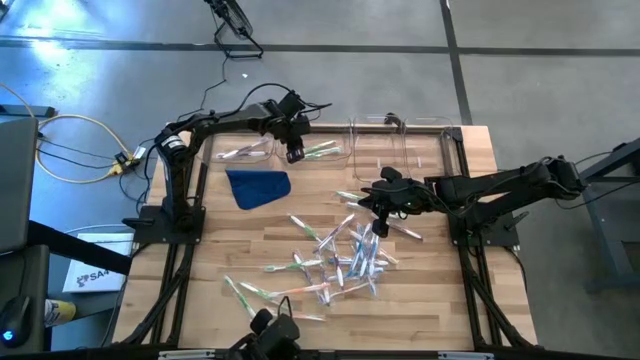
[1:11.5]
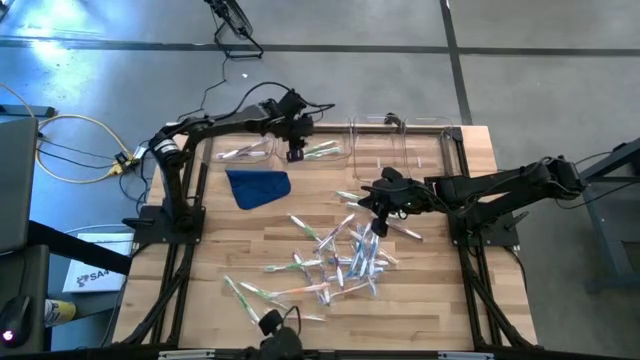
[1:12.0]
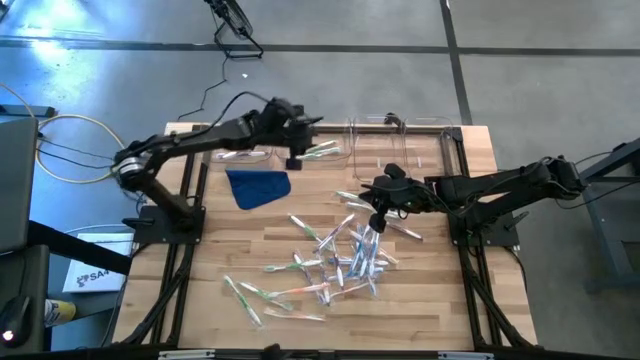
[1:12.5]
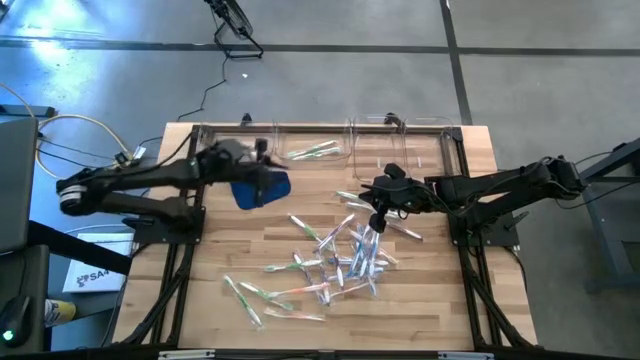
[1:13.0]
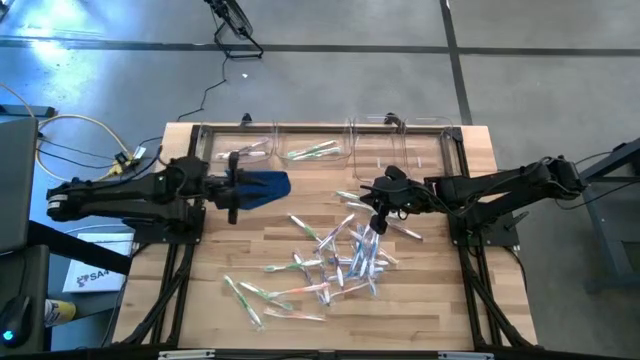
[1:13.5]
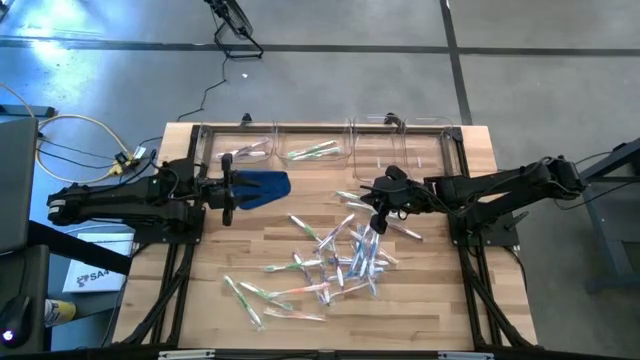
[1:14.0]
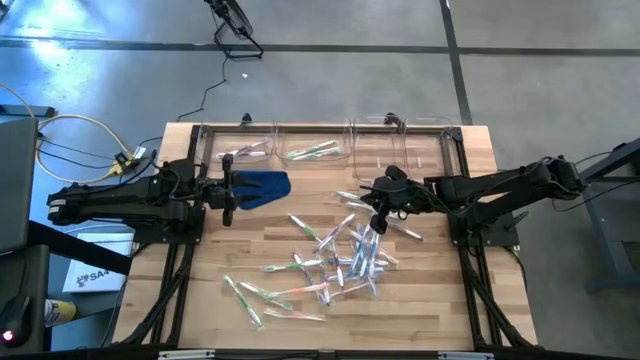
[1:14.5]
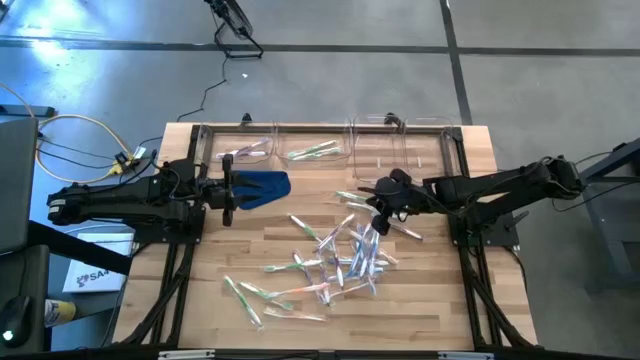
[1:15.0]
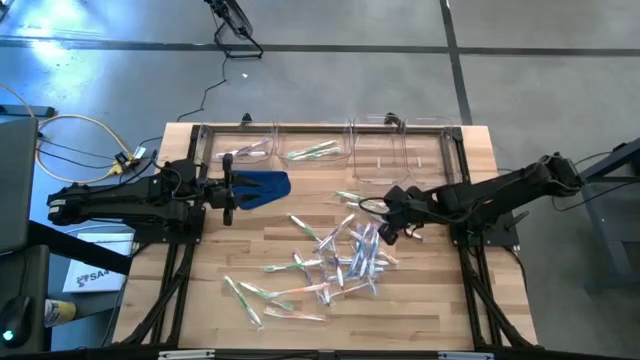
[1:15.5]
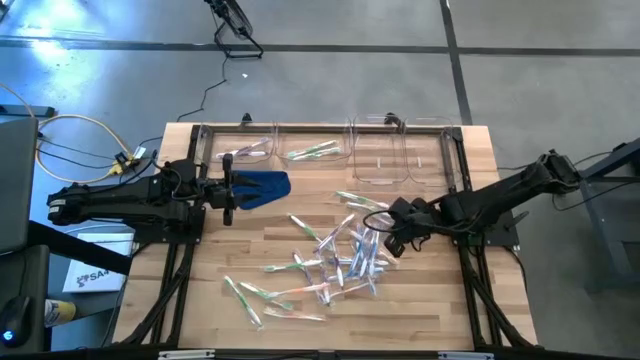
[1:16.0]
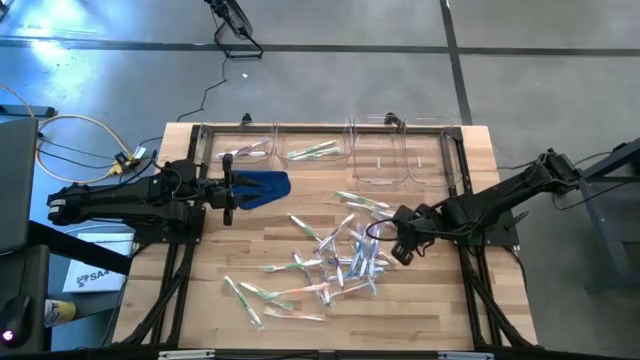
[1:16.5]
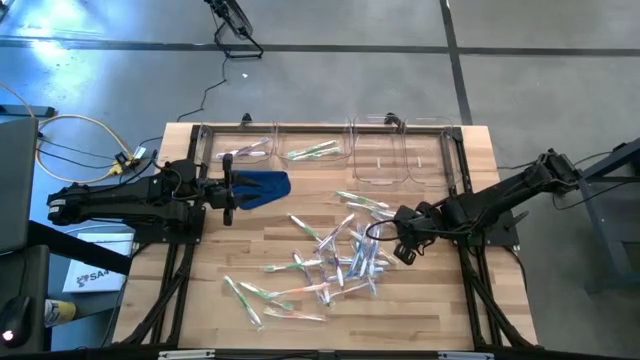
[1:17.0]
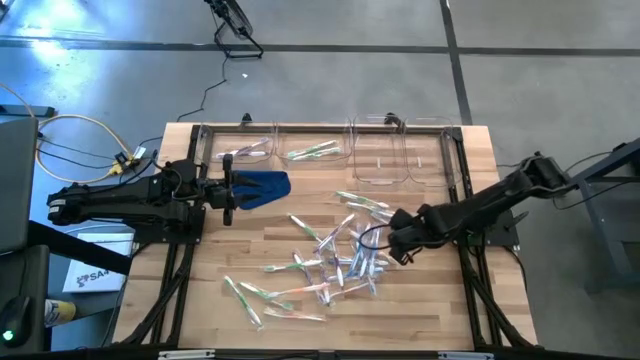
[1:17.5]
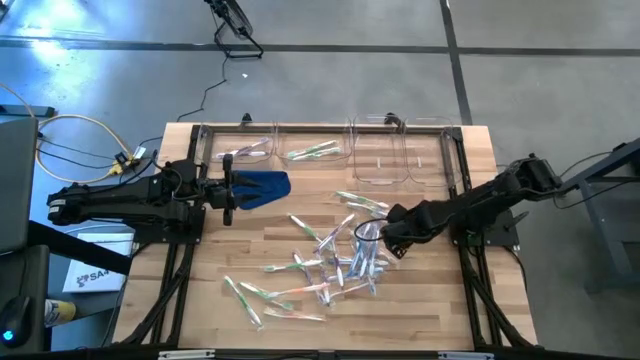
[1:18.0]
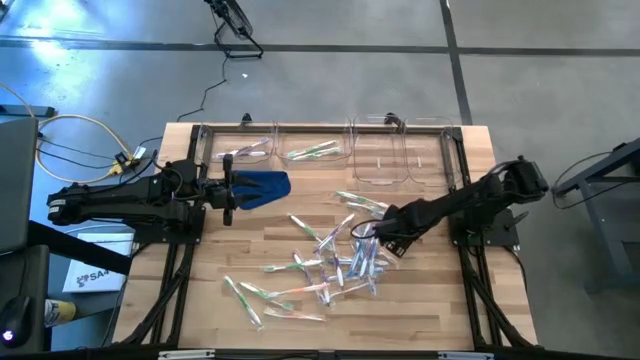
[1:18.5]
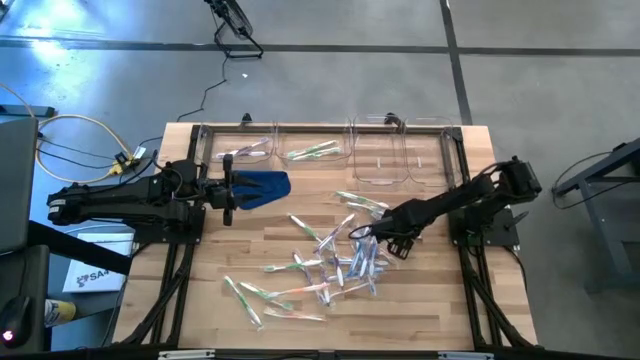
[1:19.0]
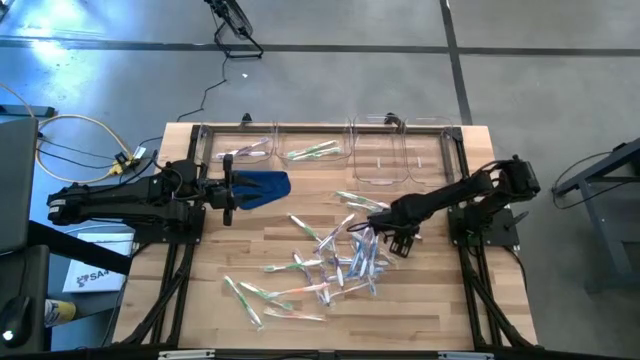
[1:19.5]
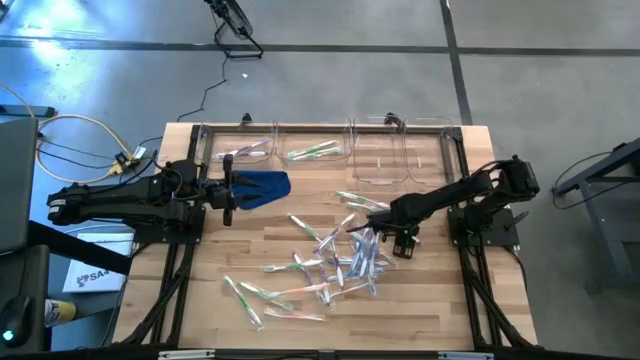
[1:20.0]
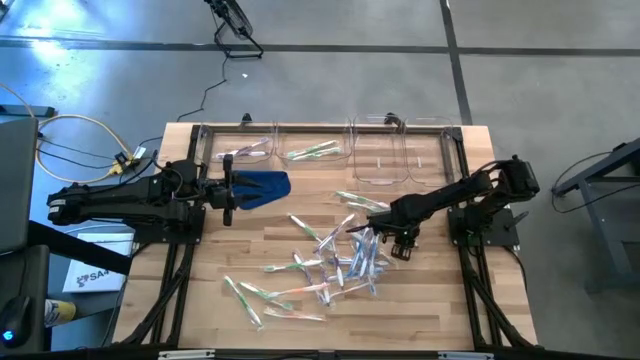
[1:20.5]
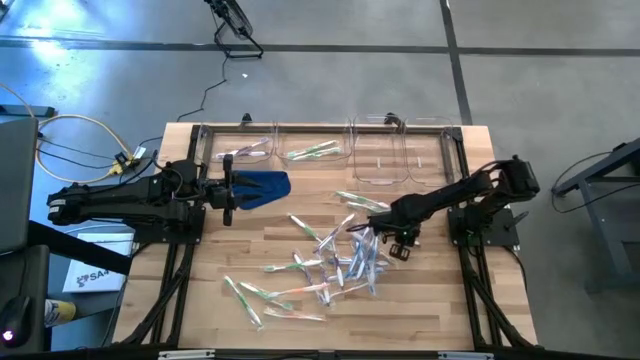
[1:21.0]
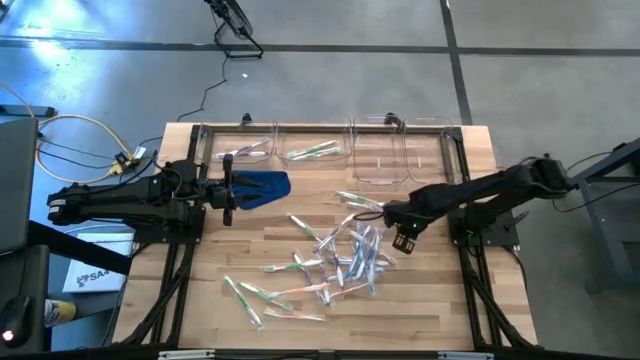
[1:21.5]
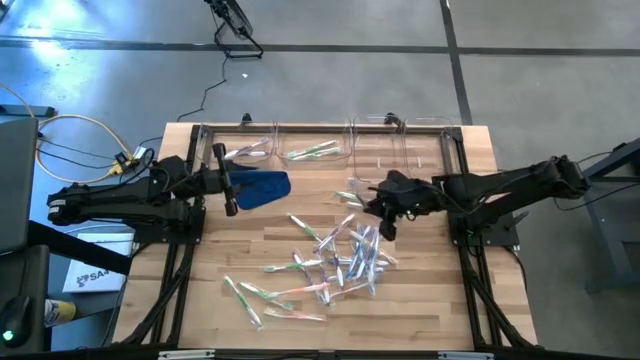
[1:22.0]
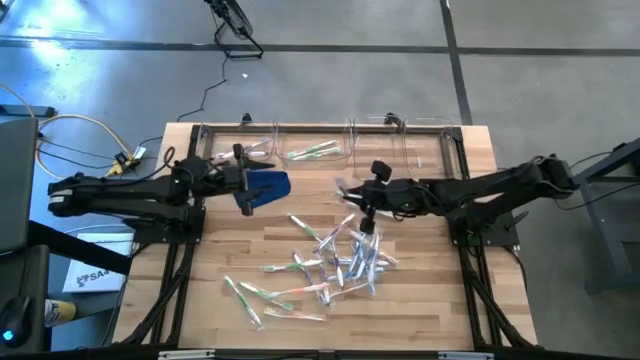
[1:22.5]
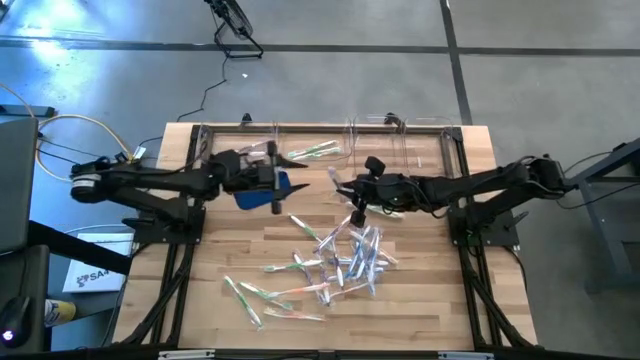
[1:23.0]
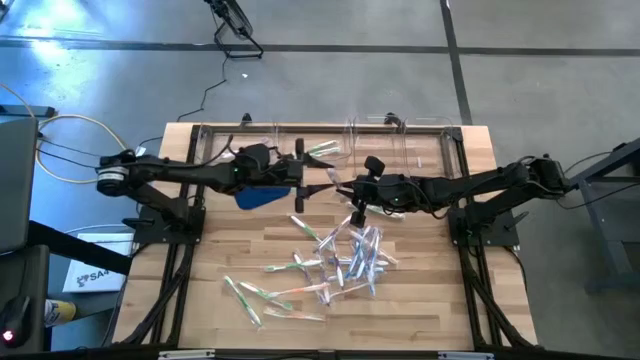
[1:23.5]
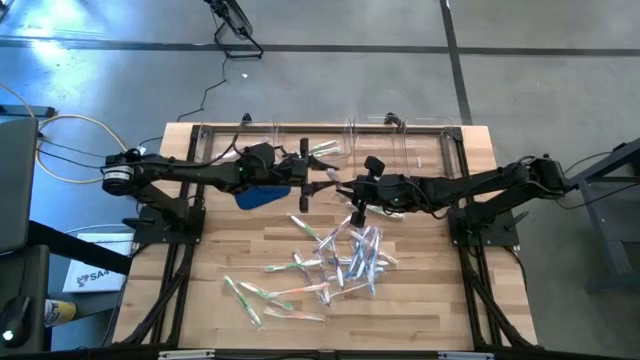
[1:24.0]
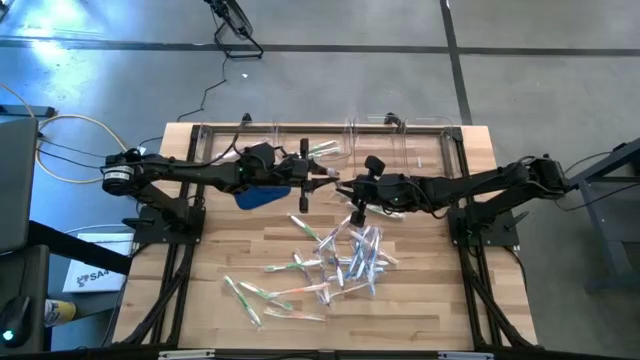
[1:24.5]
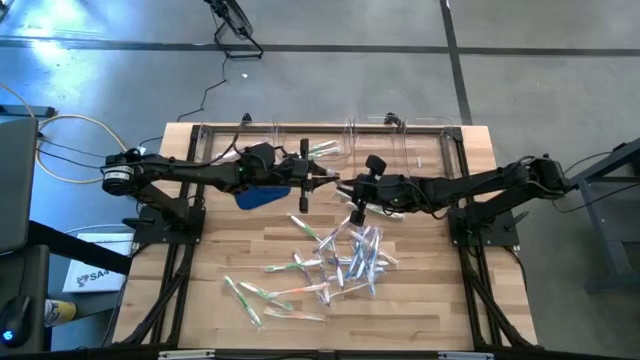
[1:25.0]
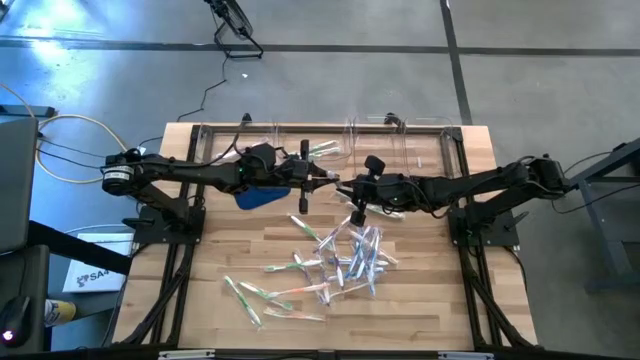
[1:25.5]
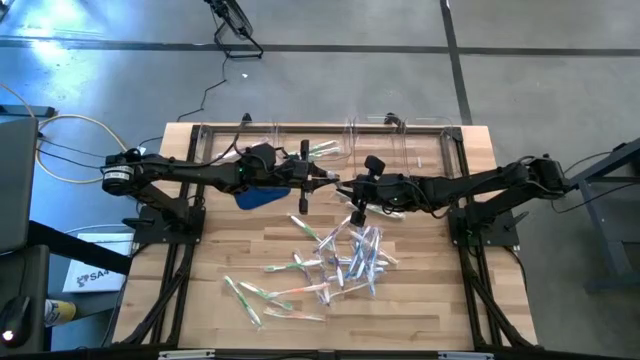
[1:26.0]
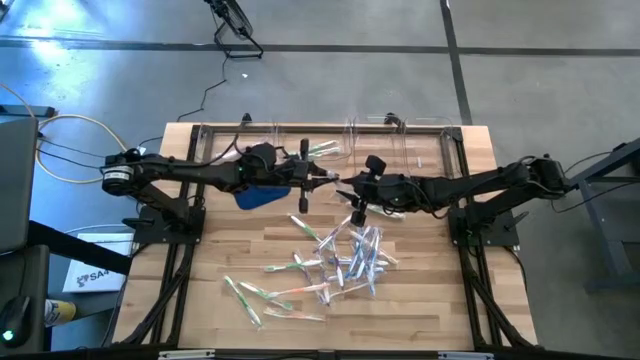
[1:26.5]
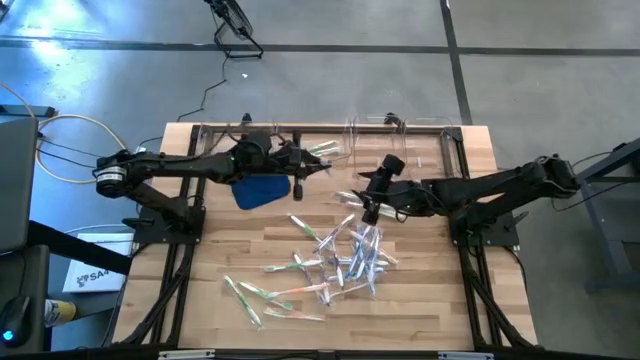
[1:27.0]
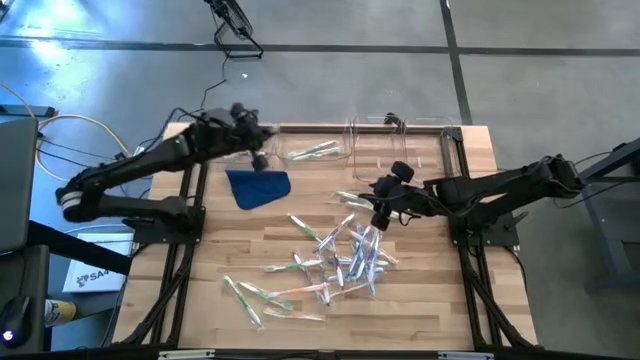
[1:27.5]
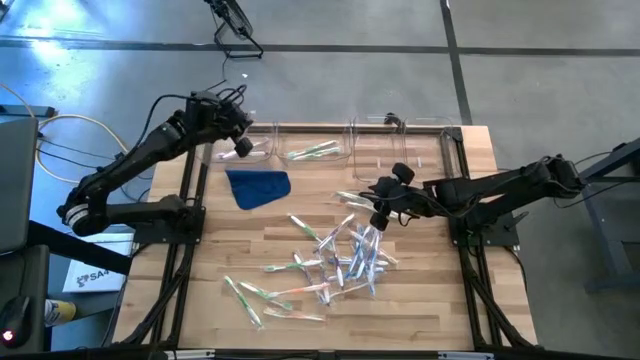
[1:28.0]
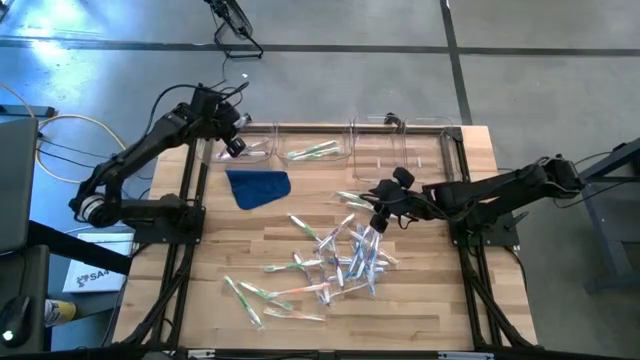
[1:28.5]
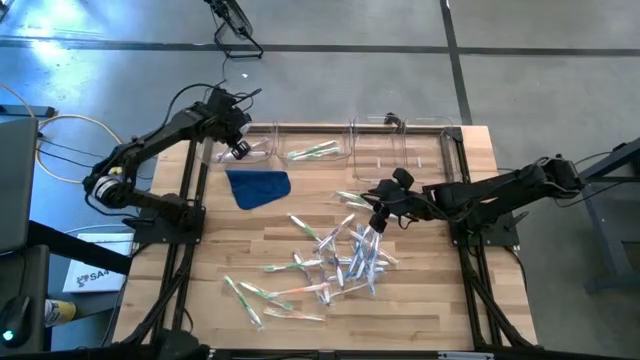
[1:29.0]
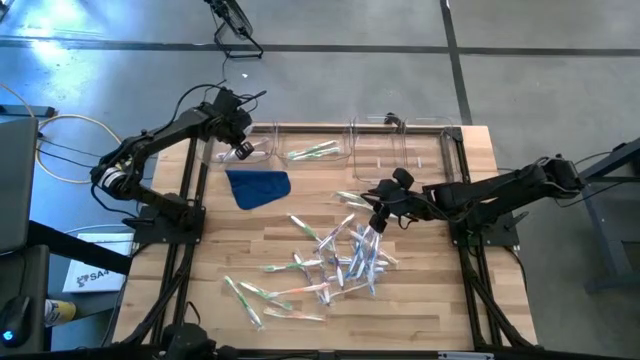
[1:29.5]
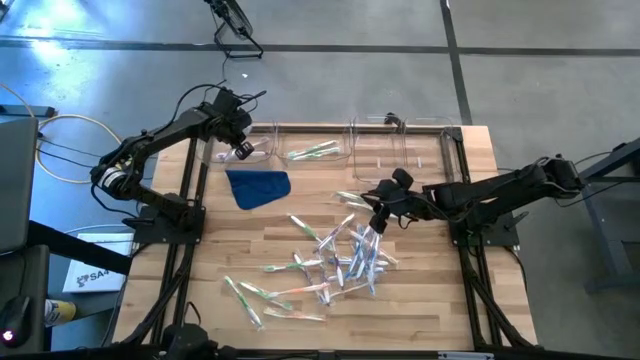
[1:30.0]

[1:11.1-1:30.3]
Task: Pick & Place Toothbrushes
Put the violet toothbrush into the left transparent bin
